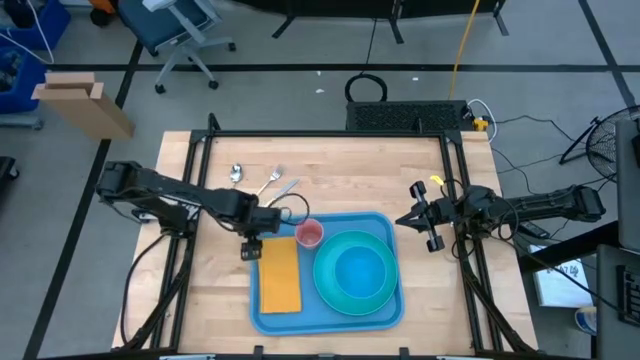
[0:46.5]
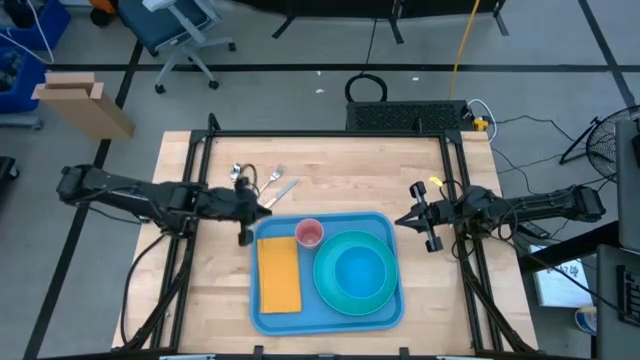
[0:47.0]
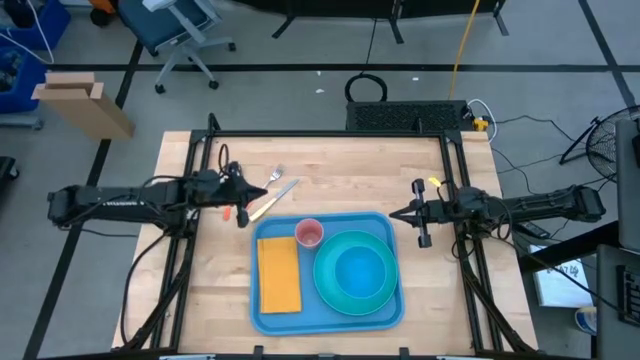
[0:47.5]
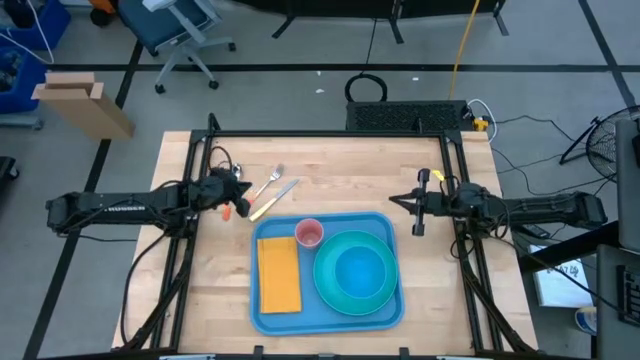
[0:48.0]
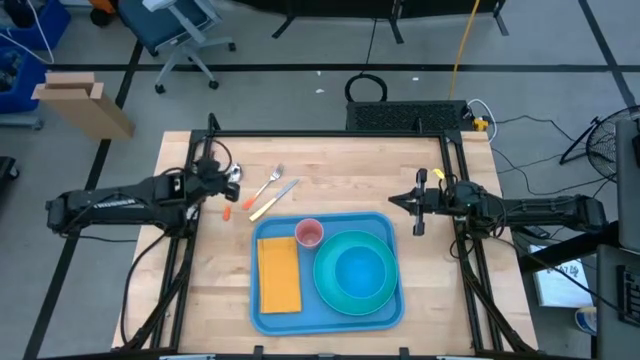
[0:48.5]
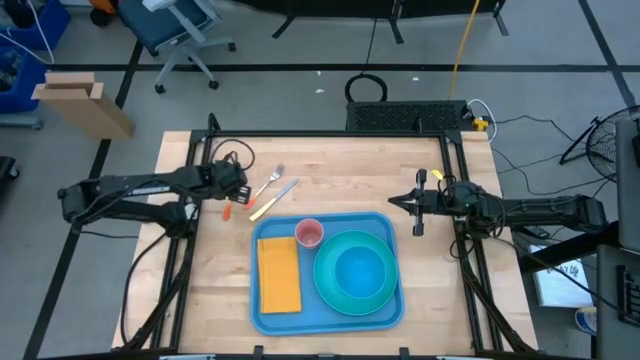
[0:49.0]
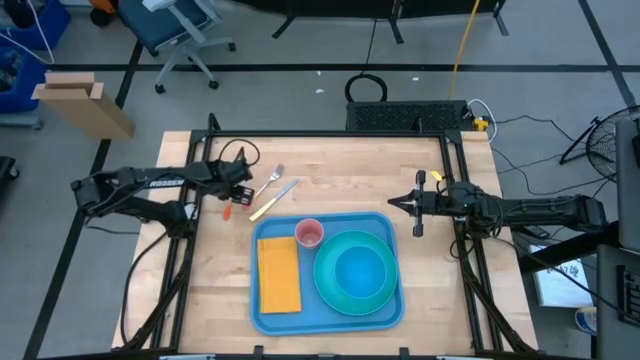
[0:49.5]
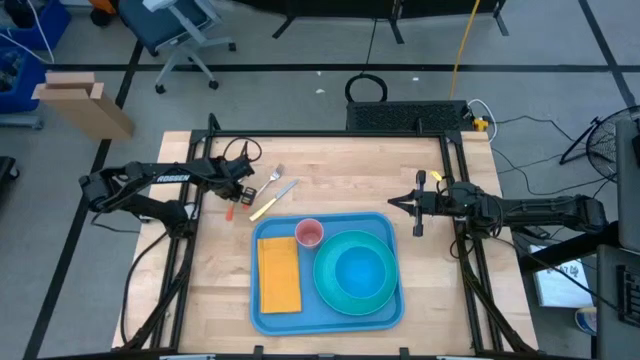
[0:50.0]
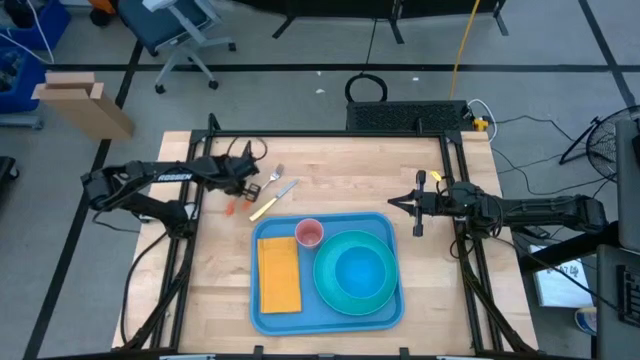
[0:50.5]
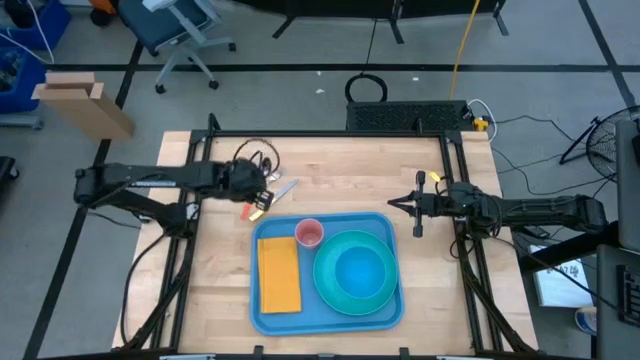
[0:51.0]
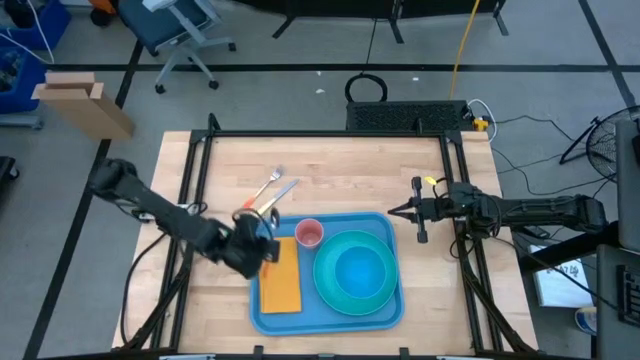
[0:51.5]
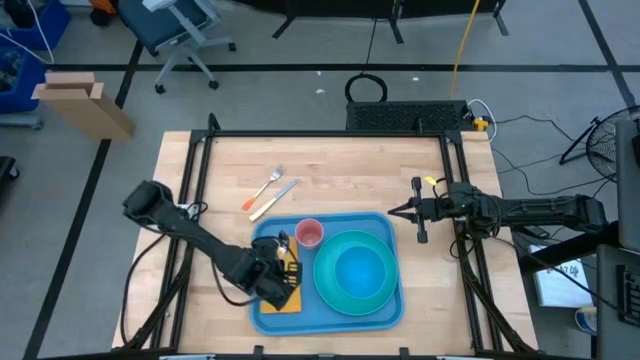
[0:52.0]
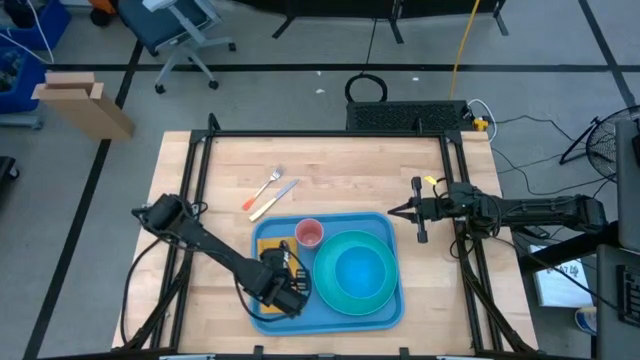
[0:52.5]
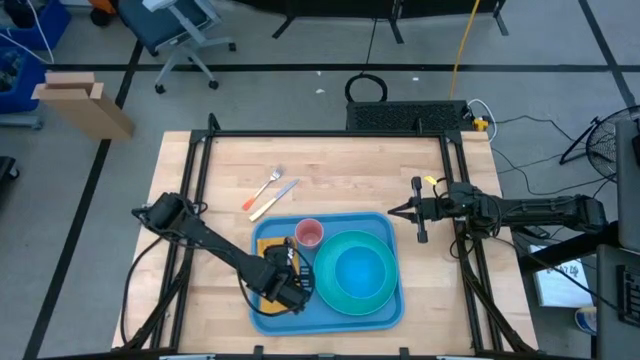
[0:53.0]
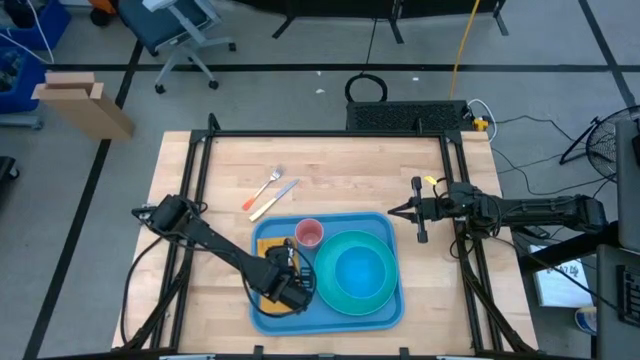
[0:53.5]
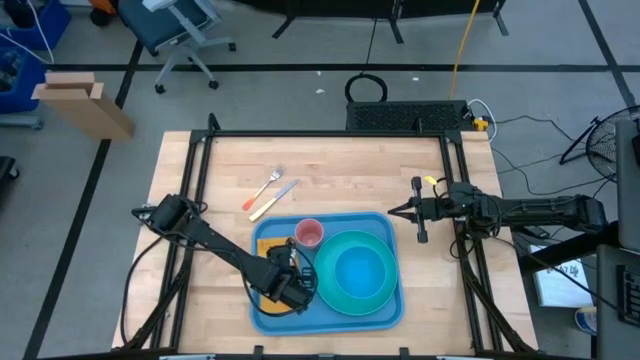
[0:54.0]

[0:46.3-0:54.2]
Task: Set up tray
Put the white and orange spoon on the yellow napkin

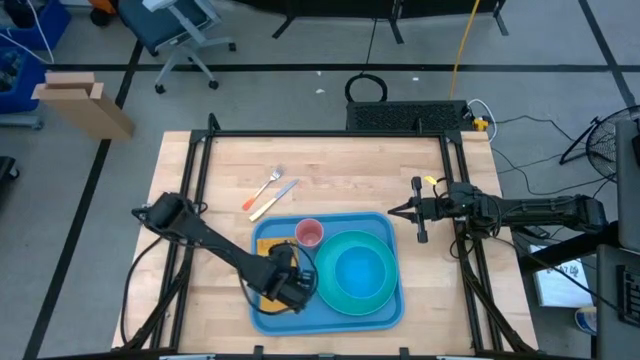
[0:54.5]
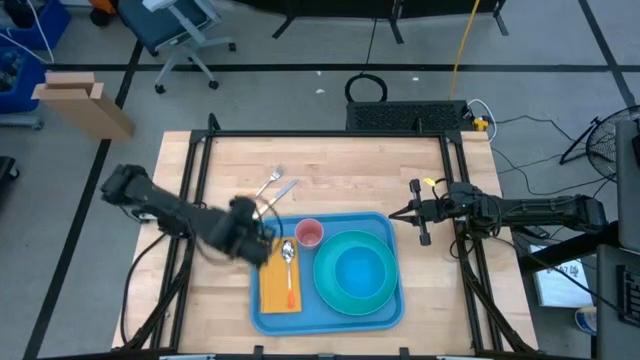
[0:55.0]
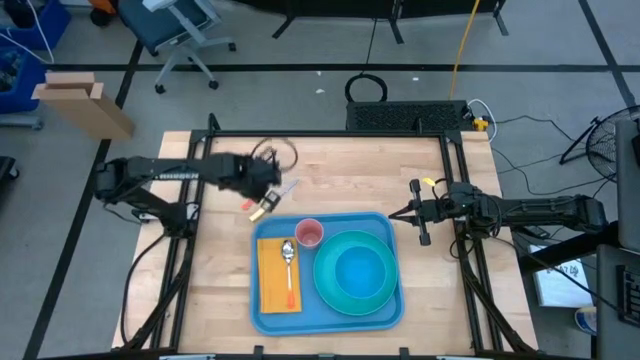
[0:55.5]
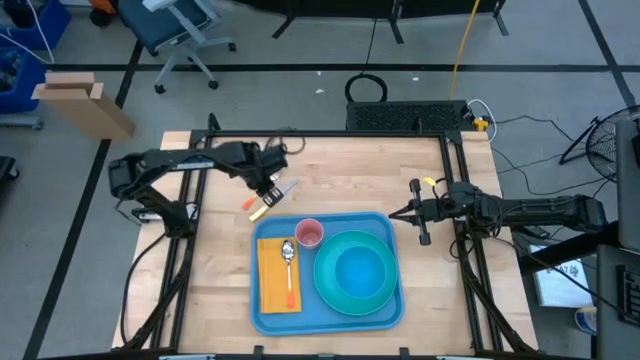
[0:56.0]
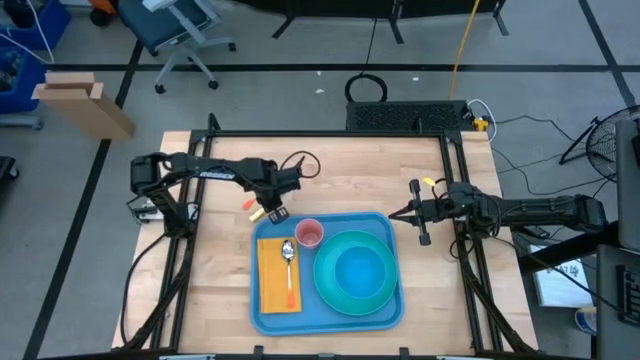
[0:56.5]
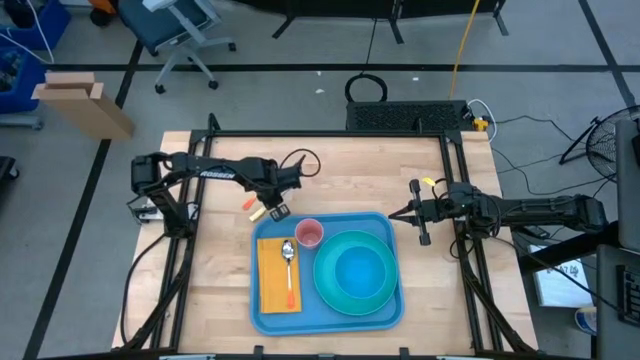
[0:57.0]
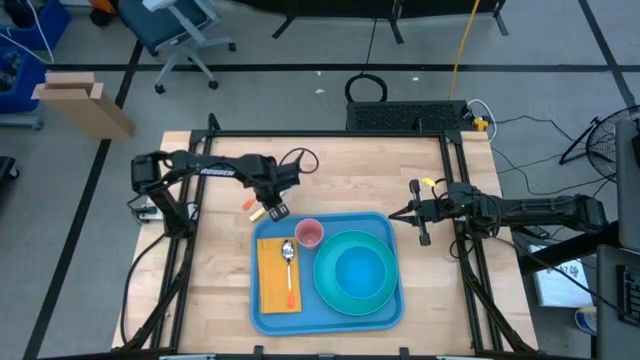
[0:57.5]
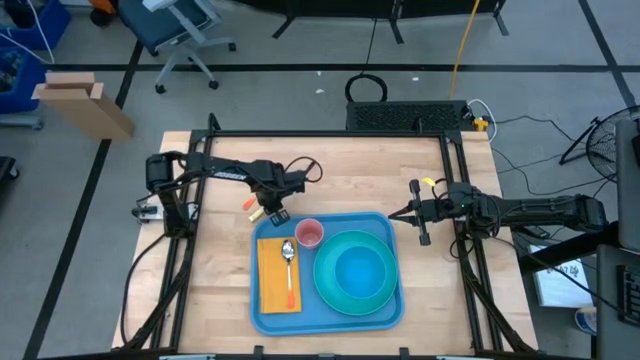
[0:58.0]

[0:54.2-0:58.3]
Put the yellow knife on the left side of the white and orange spoon

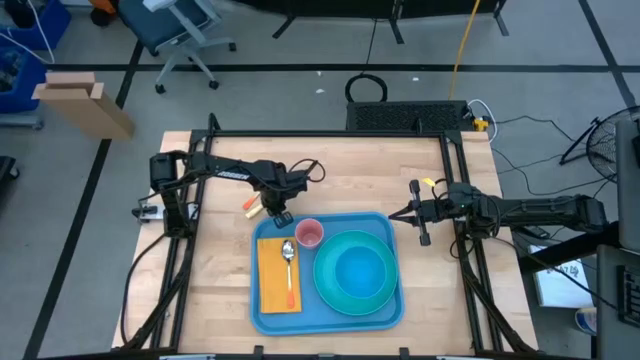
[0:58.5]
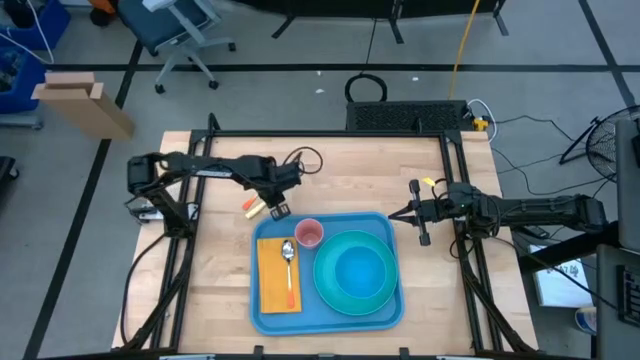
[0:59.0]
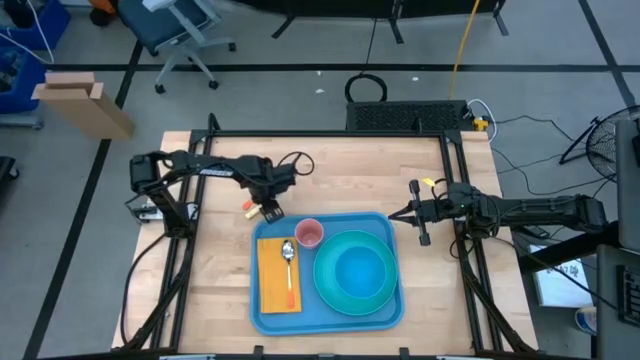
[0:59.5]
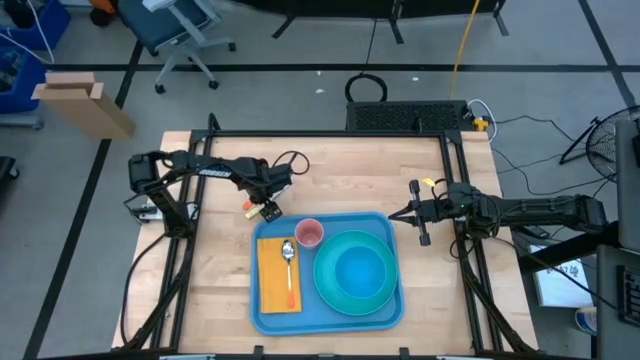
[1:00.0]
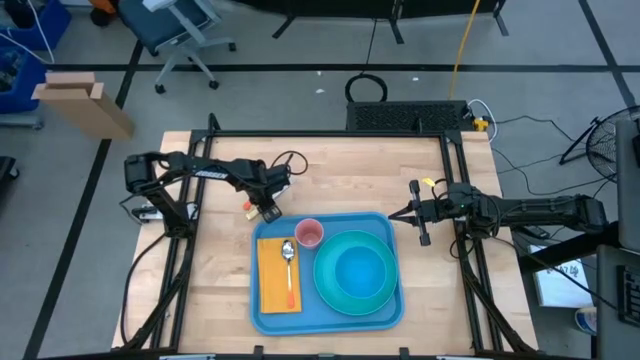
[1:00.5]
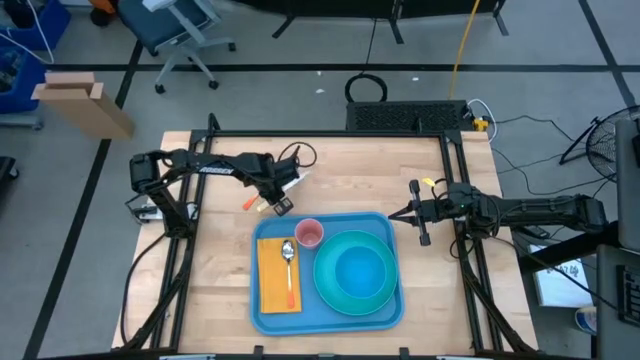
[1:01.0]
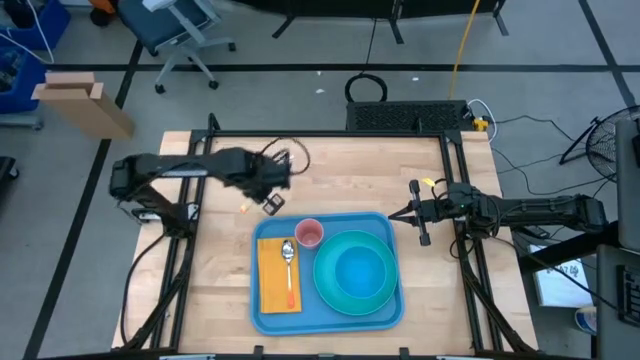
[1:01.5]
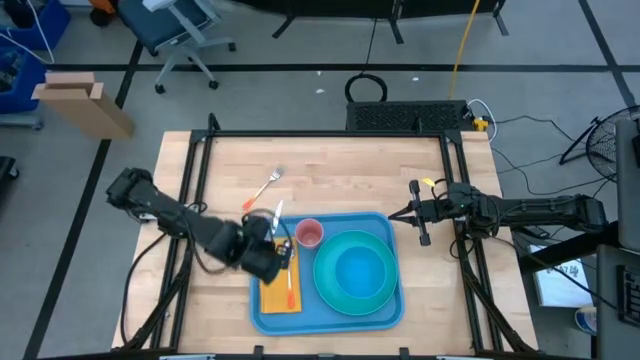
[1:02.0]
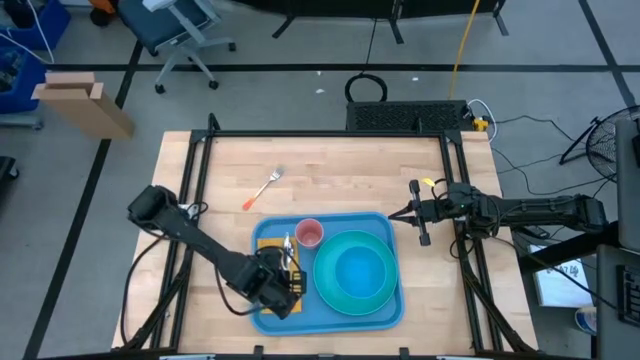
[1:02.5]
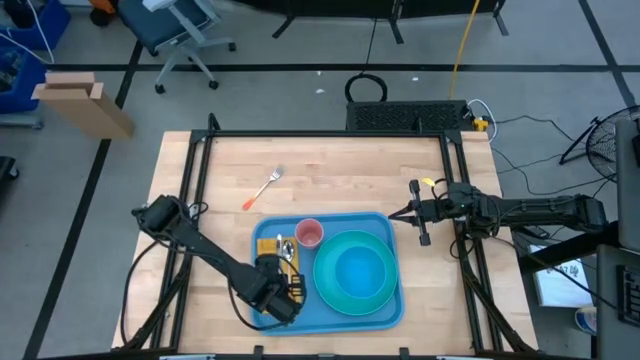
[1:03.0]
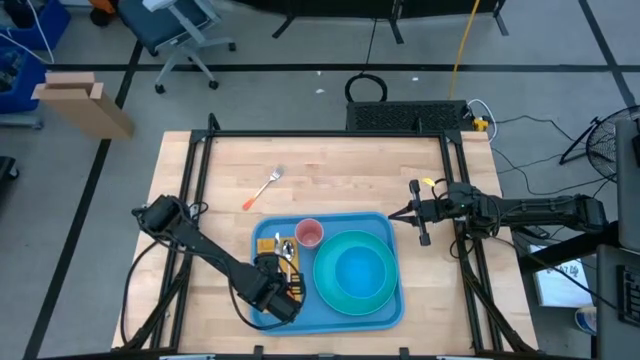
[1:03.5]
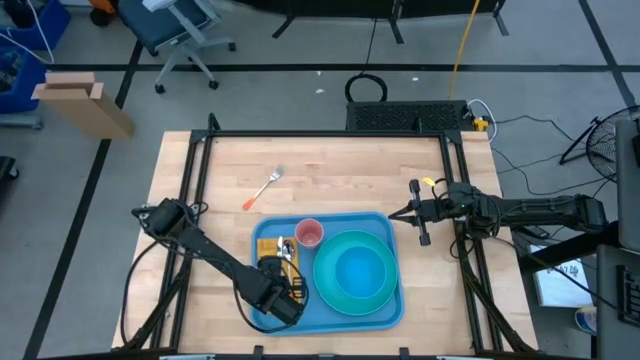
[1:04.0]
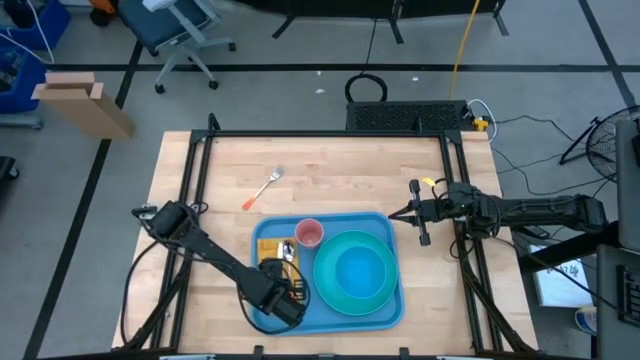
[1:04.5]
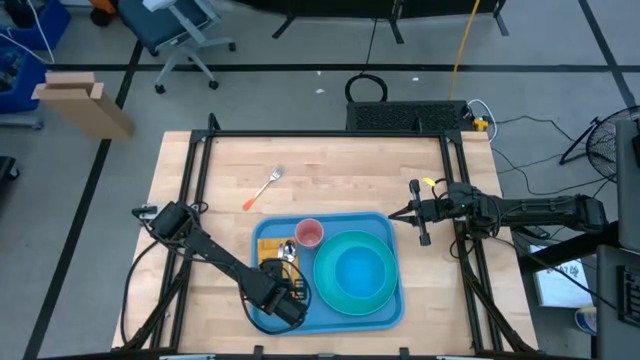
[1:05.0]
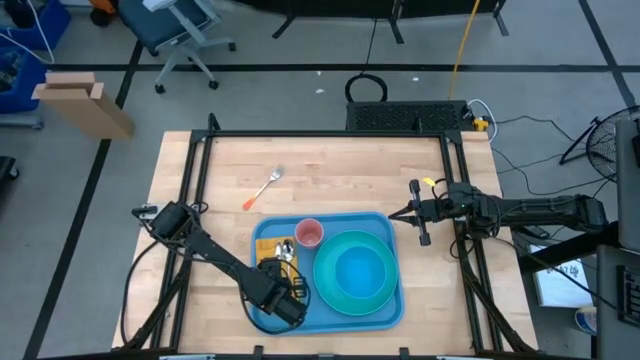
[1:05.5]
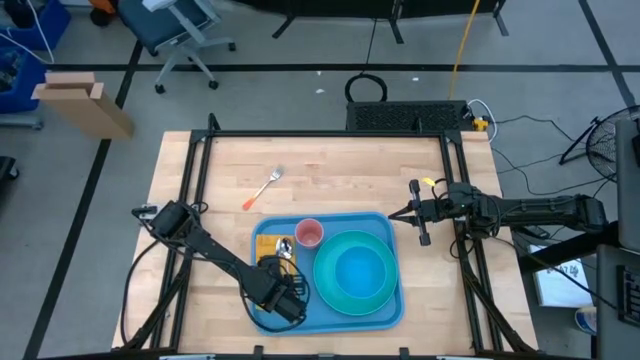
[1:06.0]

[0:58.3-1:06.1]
Put the yellow knife on the left side of the white and orange spoon

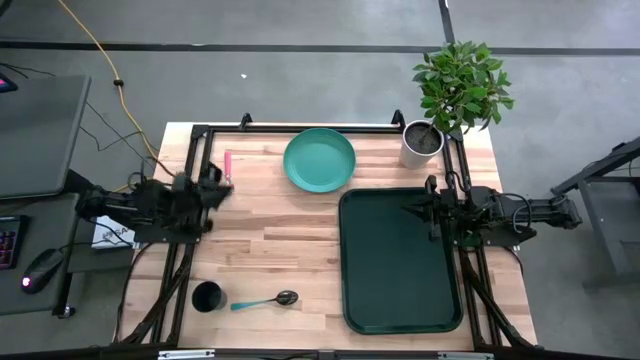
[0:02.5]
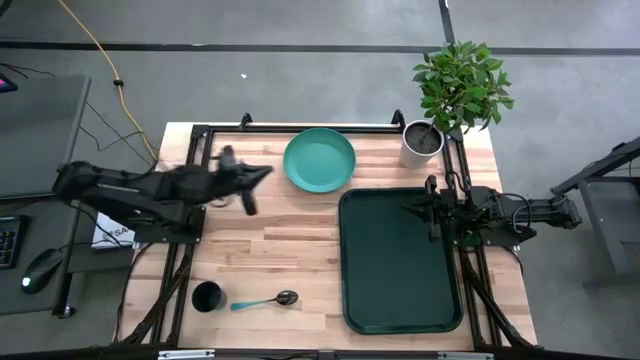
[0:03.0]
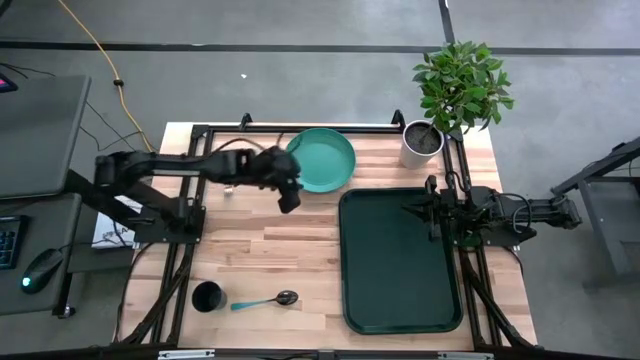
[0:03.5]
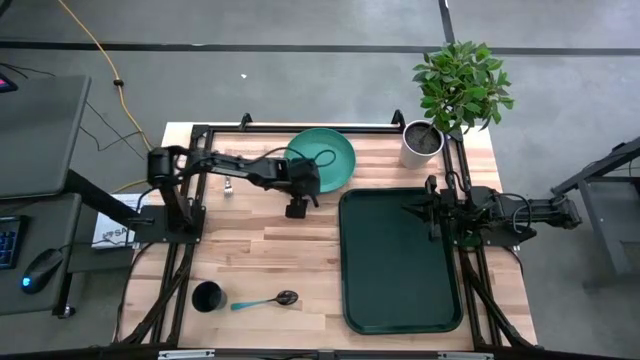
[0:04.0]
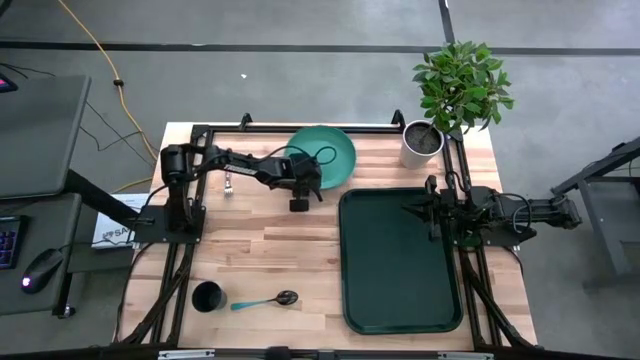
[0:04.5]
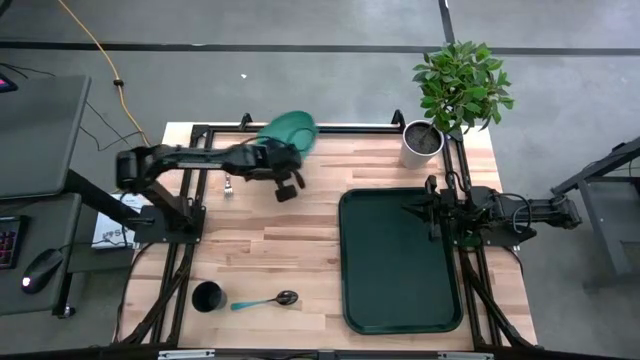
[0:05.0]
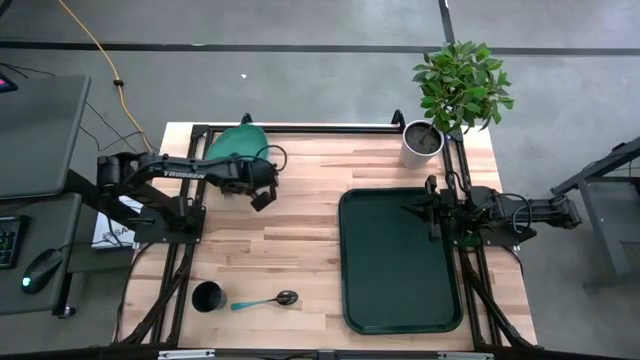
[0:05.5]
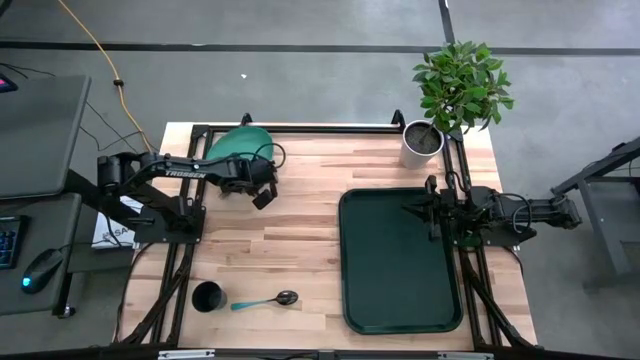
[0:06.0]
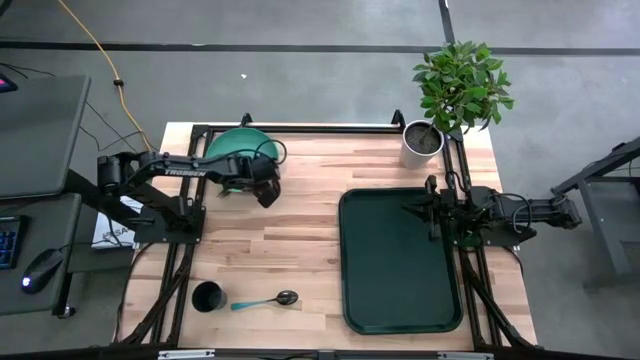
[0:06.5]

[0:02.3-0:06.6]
Task: Pick and place plate/cup/fork/spoon on tray
Move the green plate to the top left of the table
